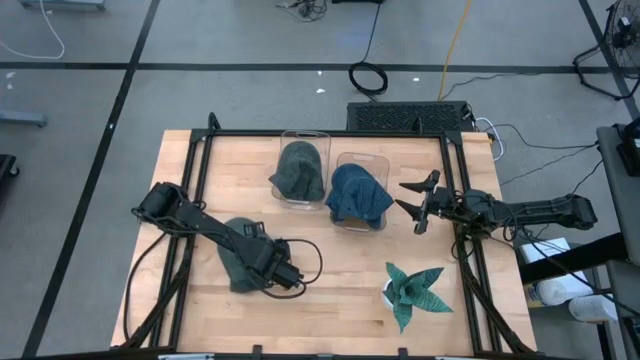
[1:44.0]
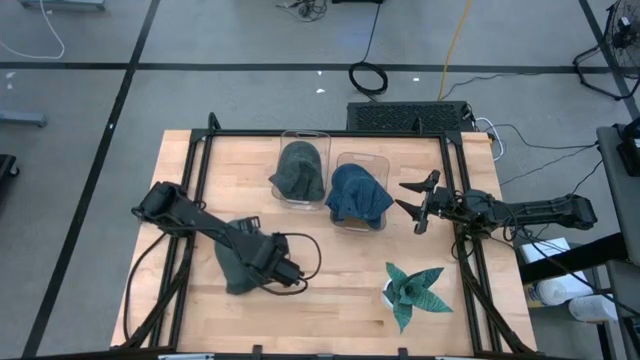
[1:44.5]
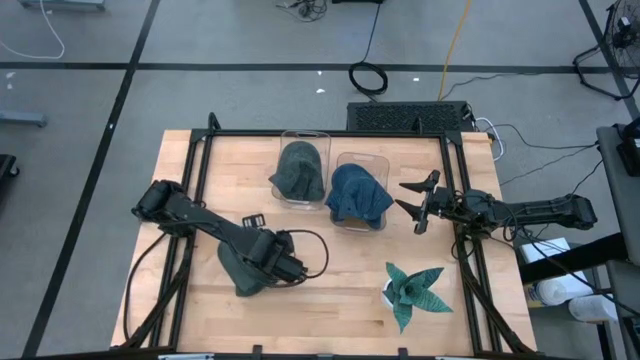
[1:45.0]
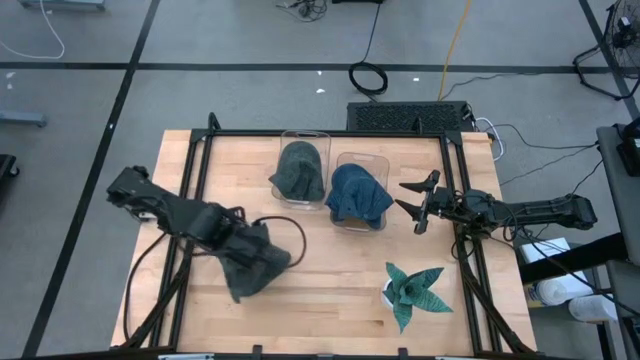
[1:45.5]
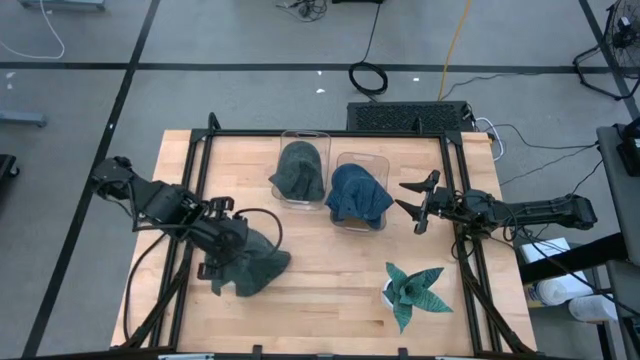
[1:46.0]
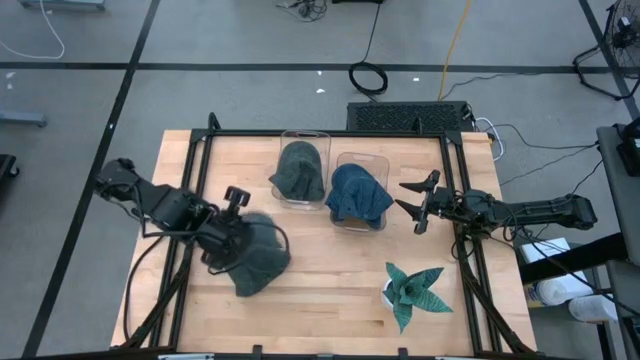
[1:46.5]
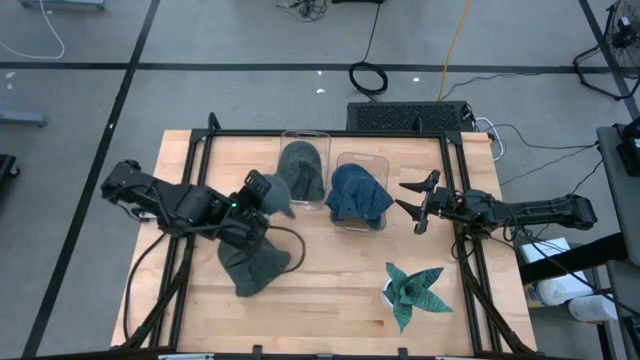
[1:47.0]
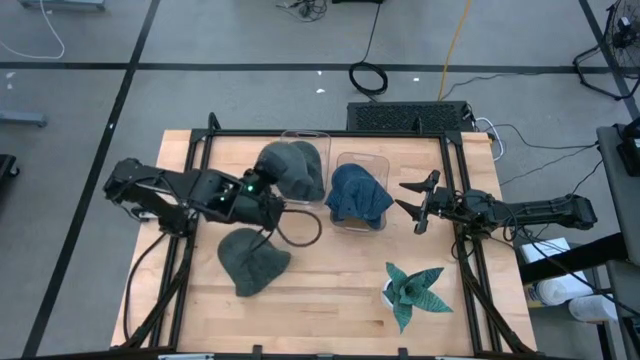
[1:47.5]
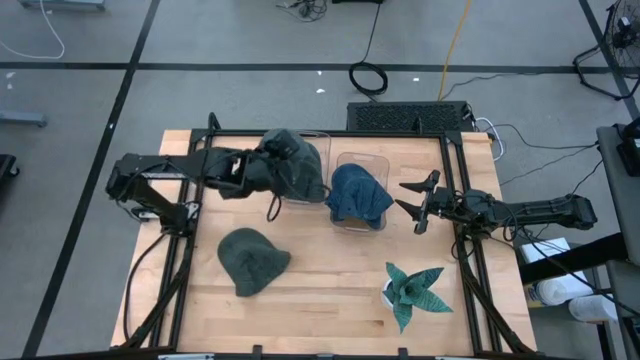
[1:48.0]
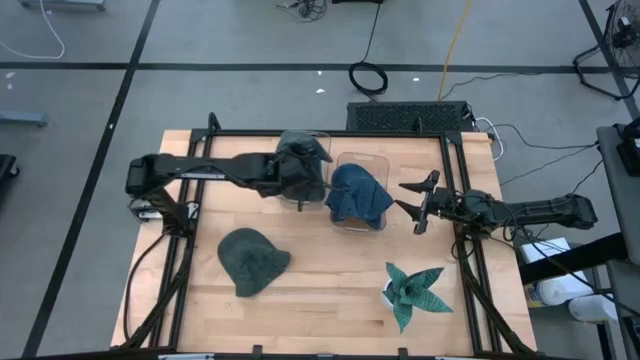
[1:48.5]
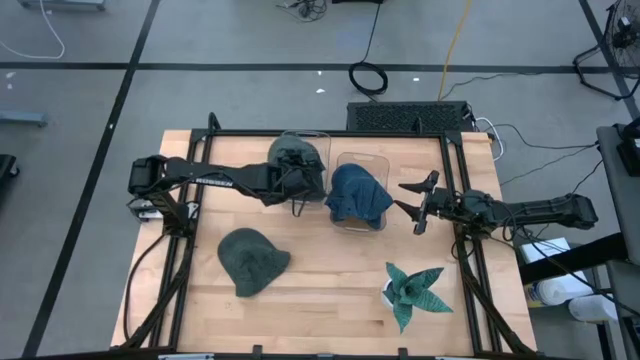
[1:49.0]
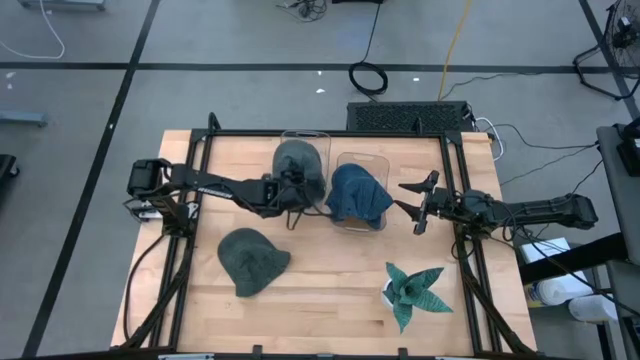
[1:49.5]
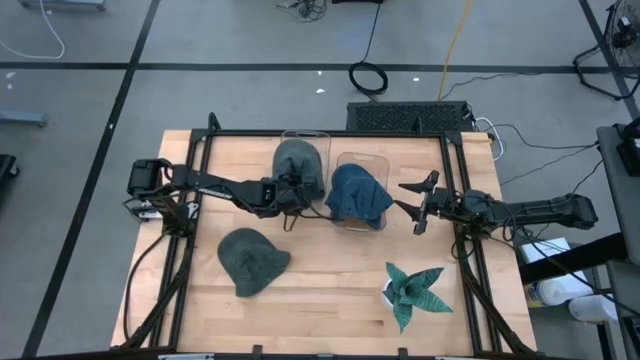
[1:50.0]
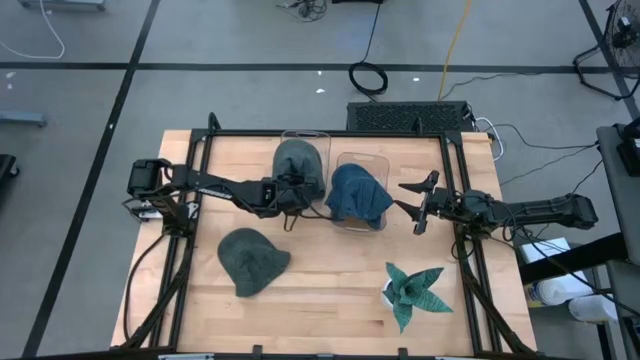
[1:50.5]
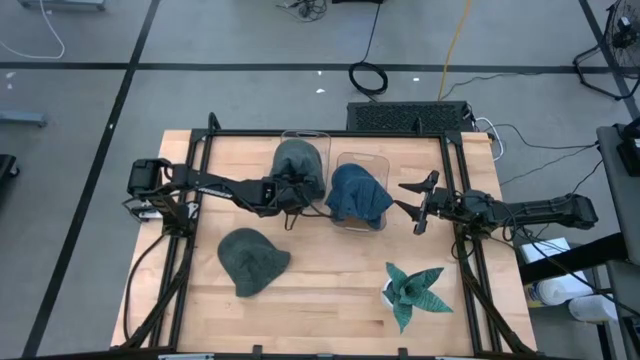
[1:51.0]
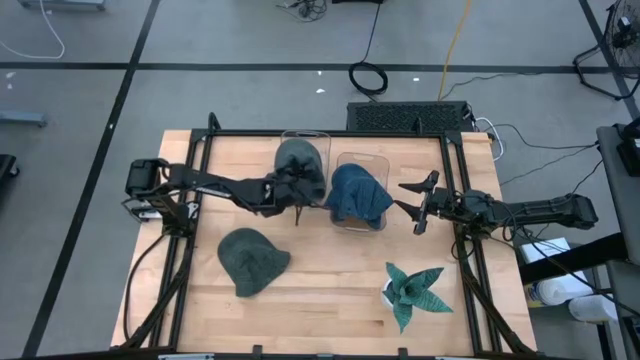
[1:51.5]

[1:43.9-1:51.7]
Task: Pick & Place hat
Put the black cap into the left transparent bin

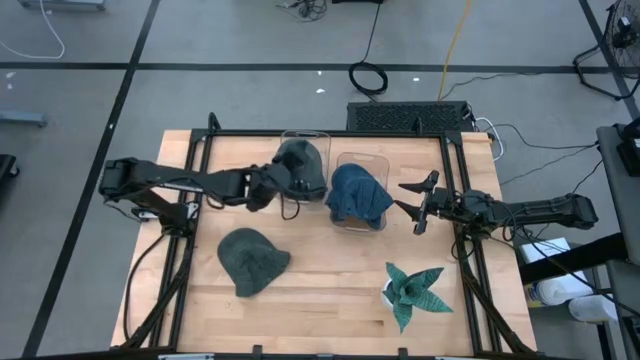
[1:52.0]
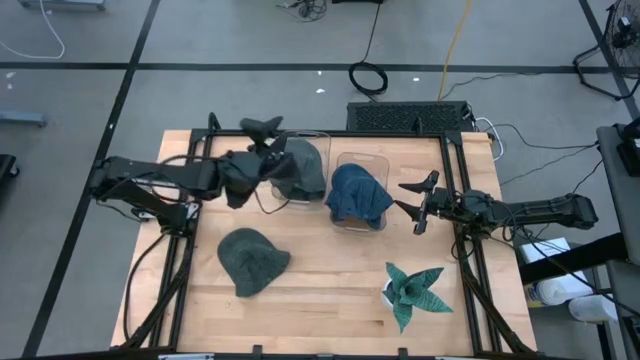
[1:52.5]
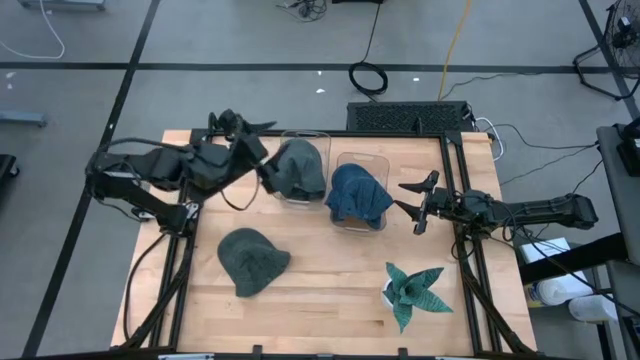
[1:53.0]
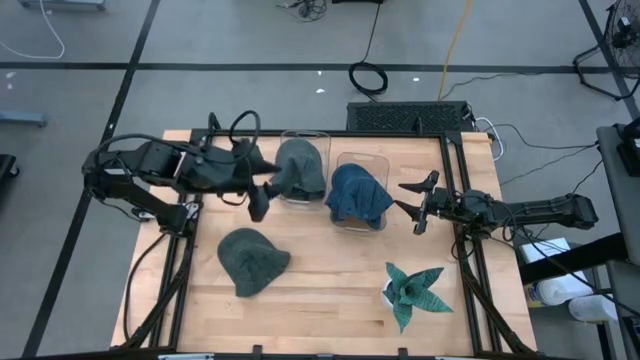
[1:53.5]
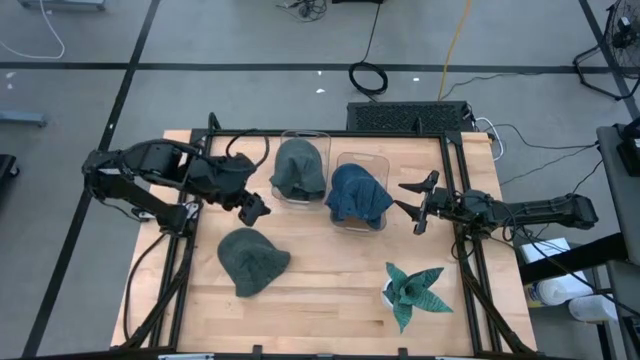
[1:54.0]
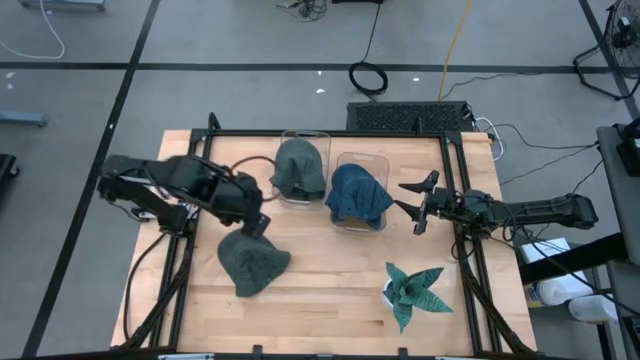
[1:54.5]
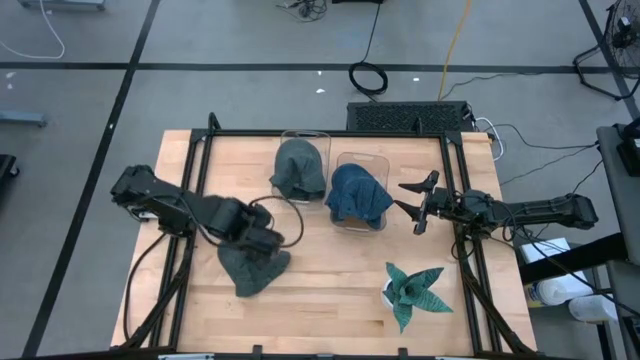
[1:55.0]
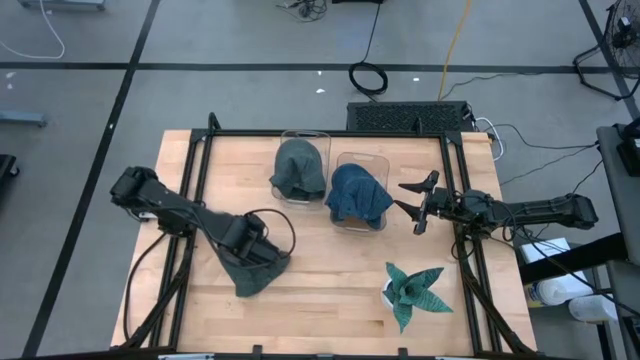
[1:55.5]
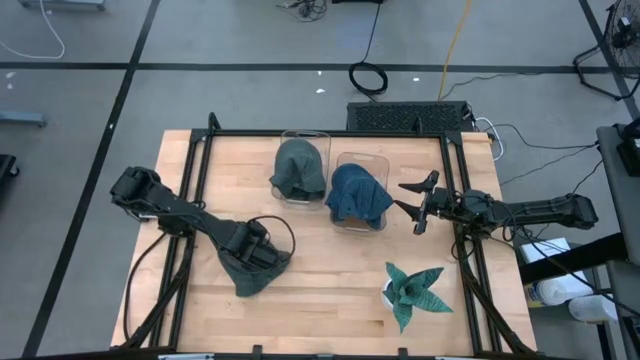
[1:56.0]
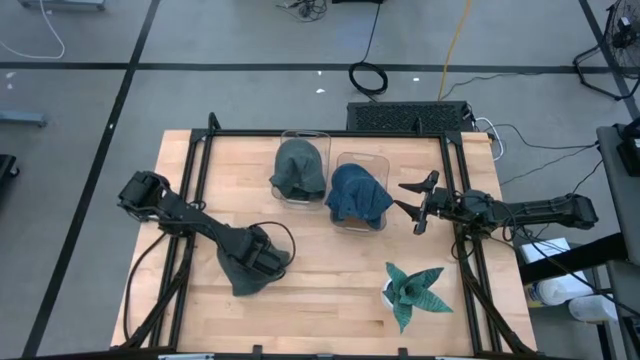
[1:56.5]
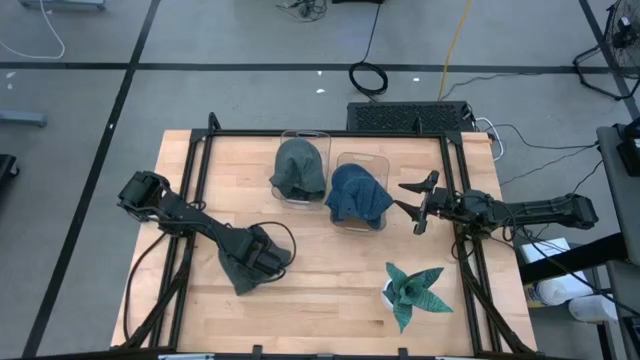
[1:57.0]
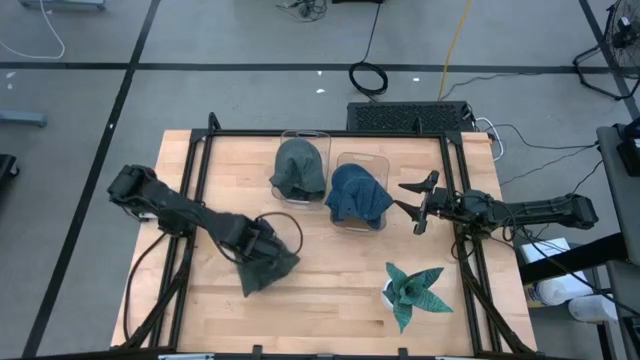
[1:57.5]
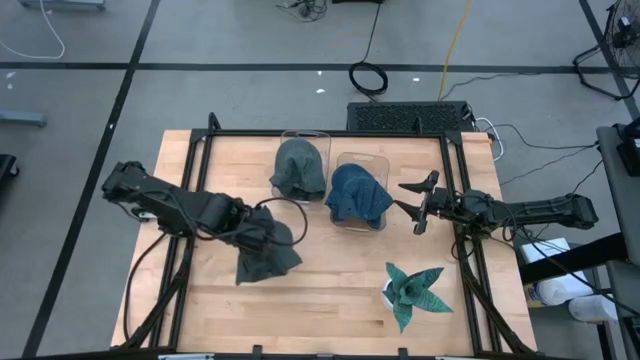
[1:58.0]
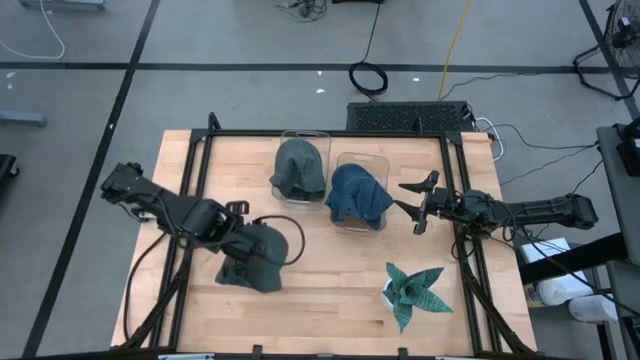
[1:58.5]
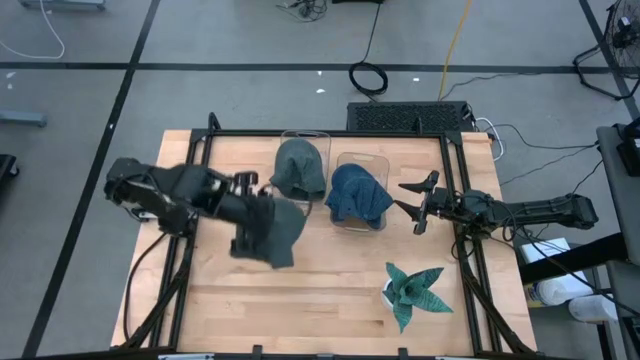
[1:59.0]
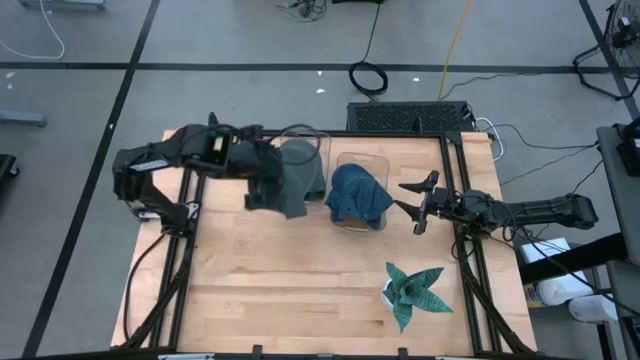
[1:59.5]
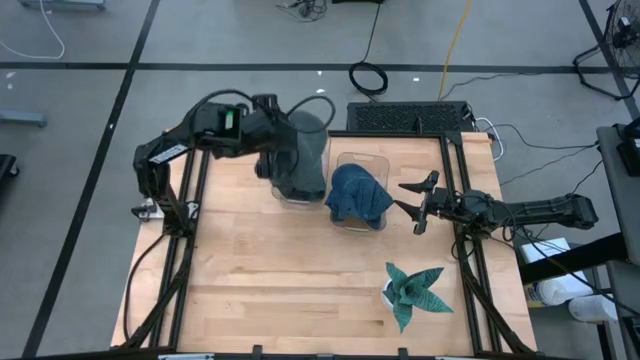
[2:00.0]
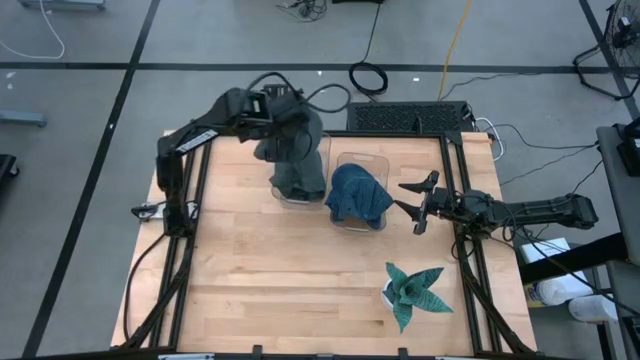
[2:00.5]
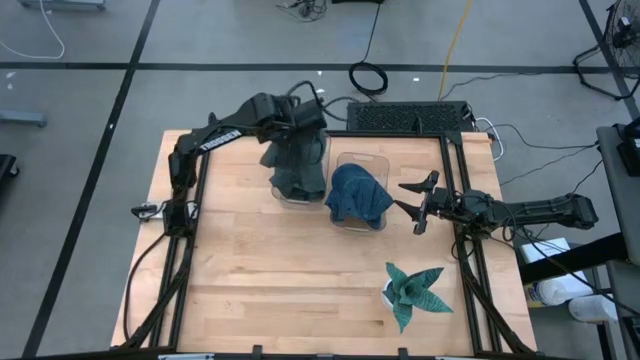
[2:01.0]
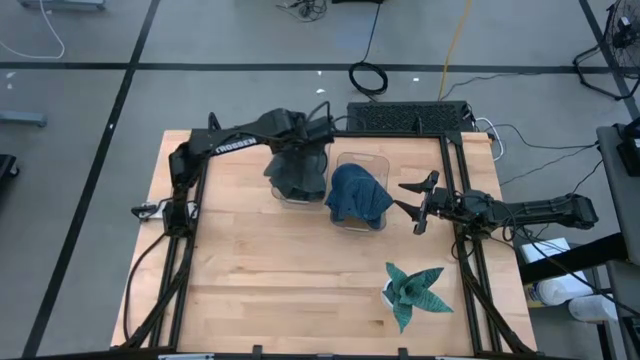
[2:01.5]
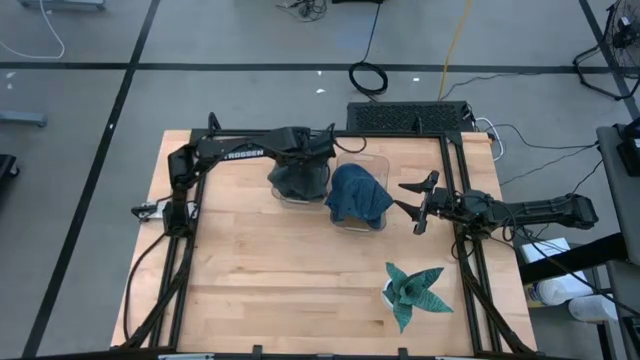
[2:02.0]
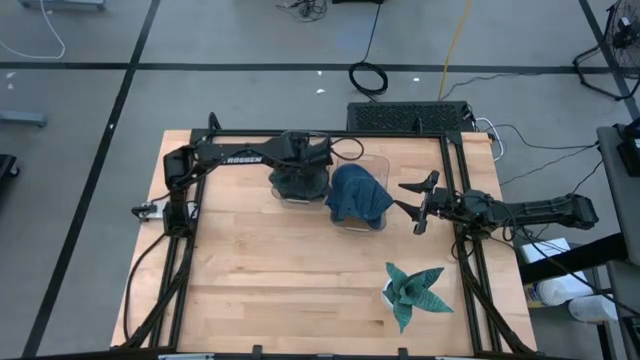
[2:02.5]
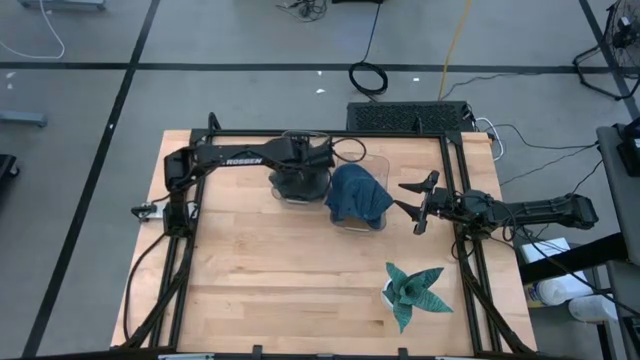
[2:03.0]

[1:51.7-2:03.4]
Put the black cap into the left transparent bin

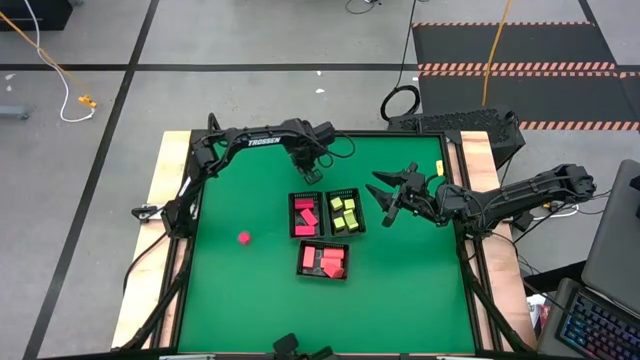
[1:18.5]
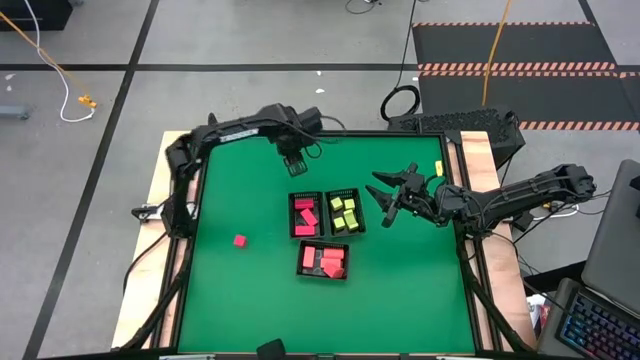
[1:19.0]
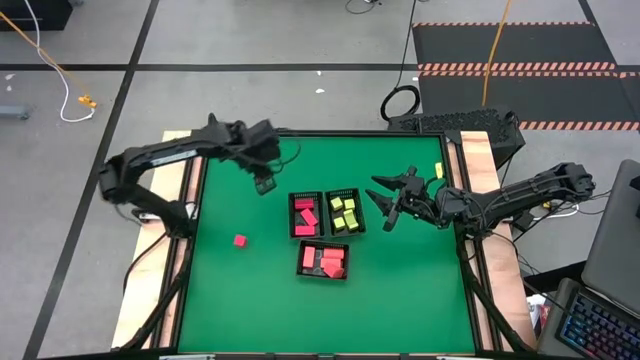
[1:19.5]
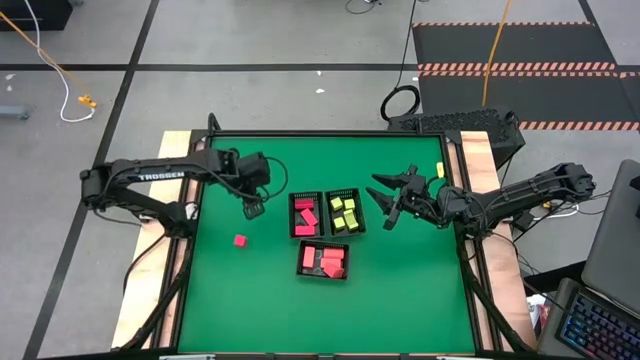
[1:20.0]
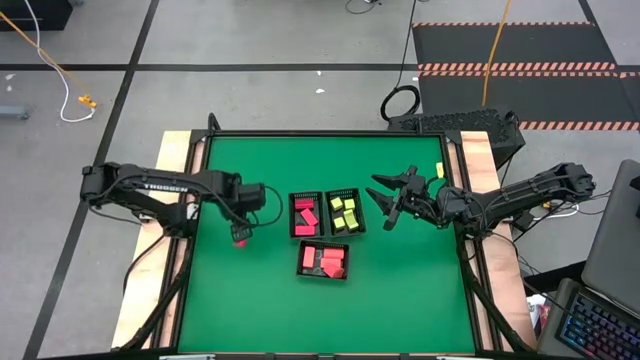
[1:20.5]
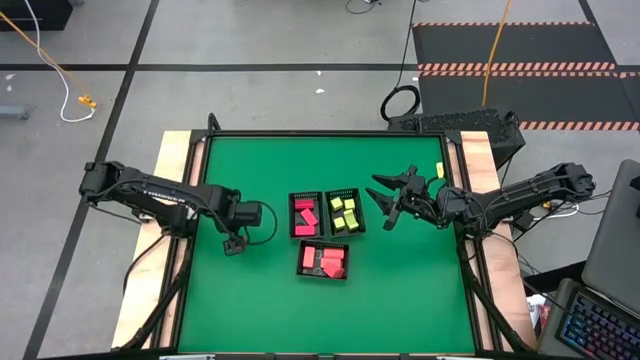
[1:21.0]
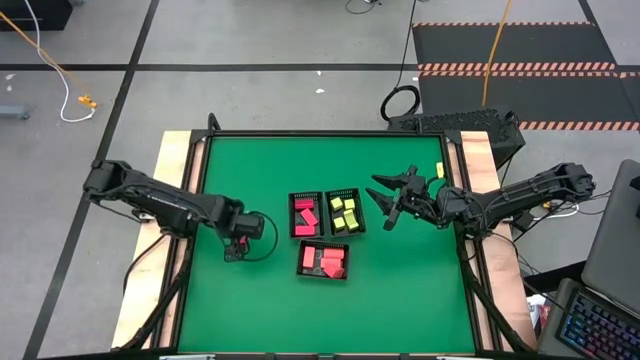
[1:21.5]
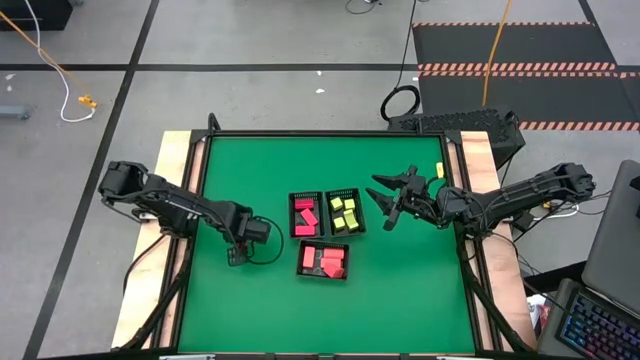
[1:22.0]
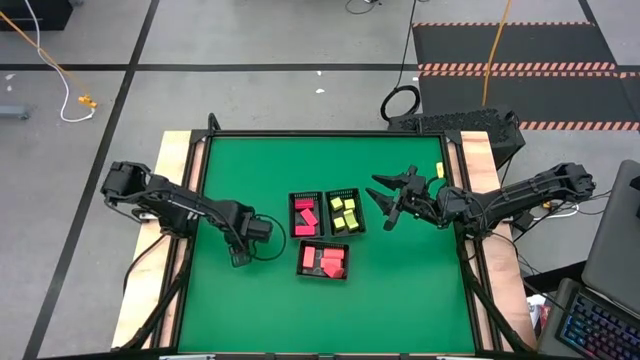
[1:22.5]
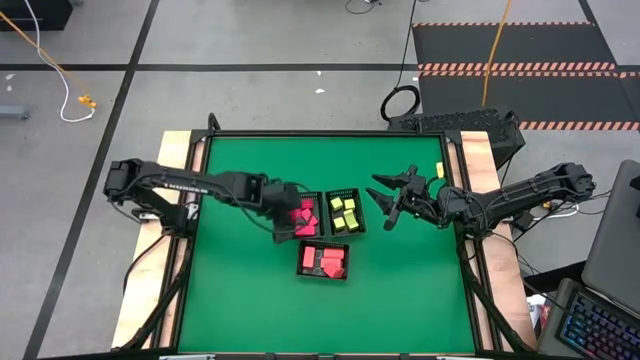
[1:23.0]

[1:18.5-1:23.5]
Task: Sort & place blocks by color
Put the red block into the top left black bin
